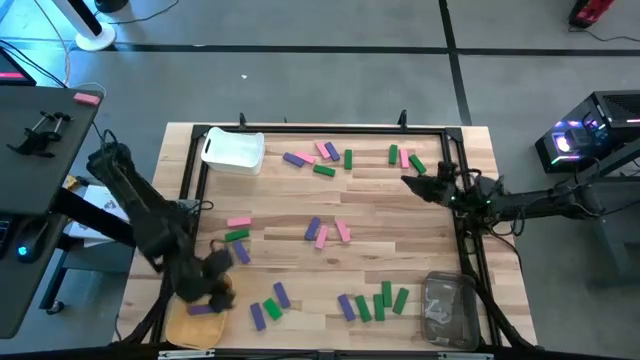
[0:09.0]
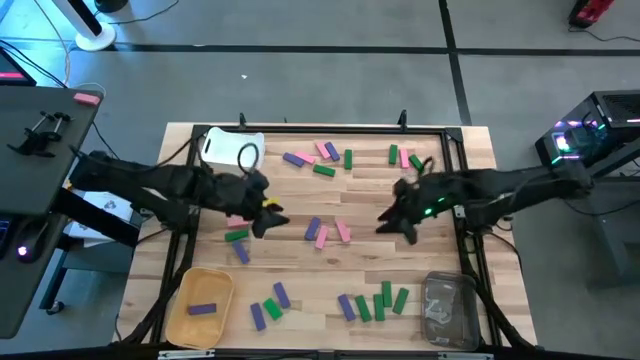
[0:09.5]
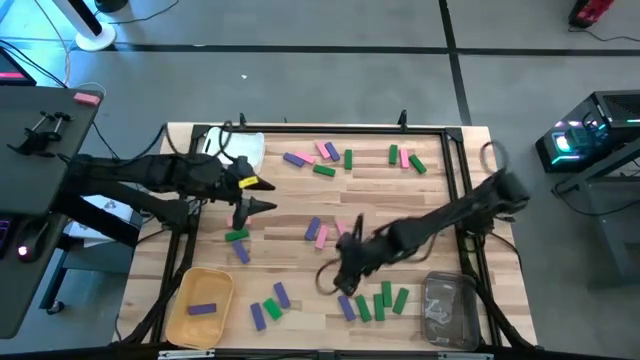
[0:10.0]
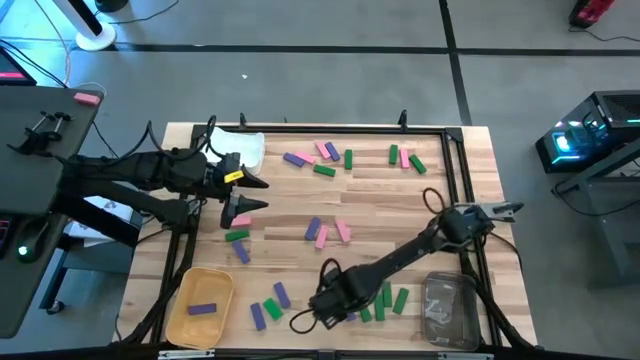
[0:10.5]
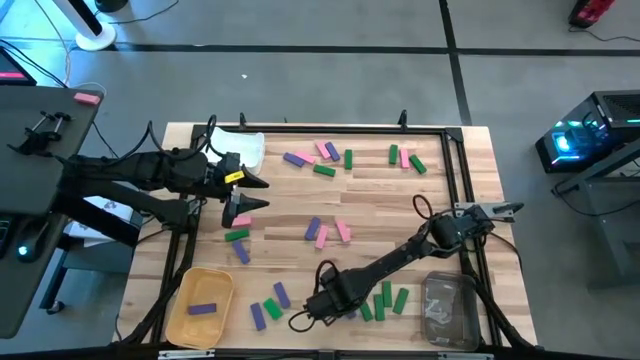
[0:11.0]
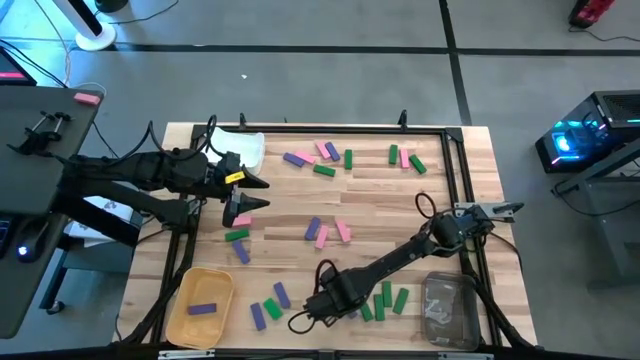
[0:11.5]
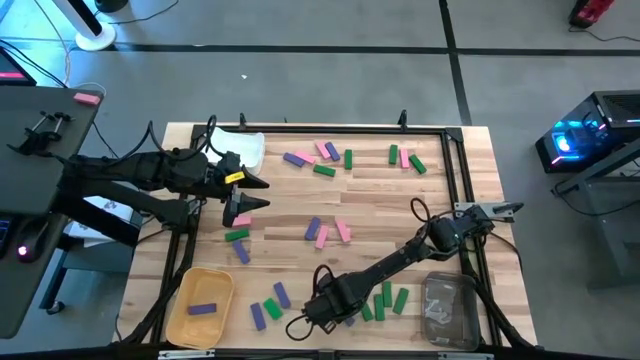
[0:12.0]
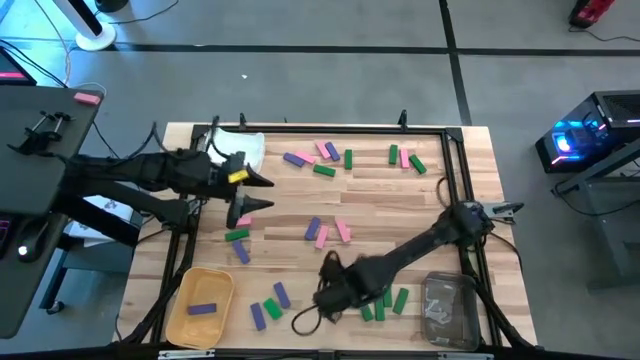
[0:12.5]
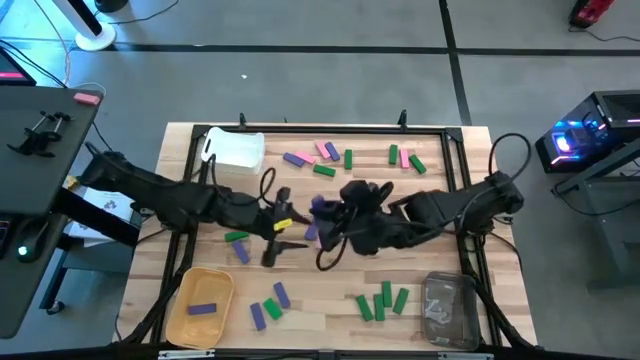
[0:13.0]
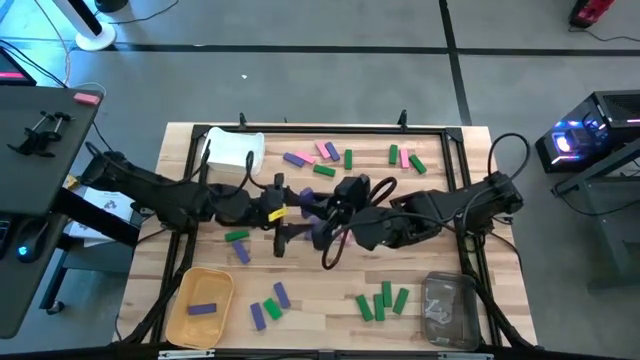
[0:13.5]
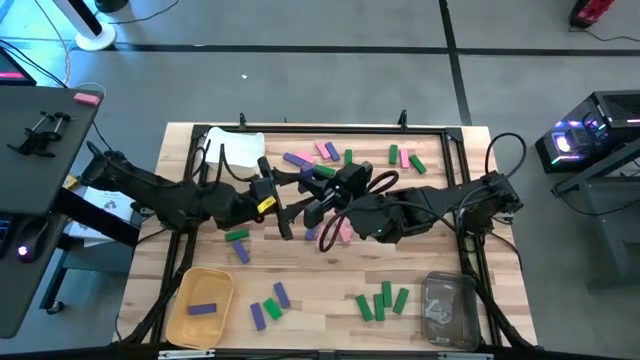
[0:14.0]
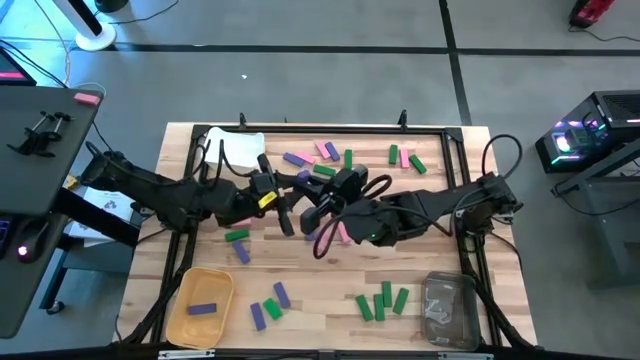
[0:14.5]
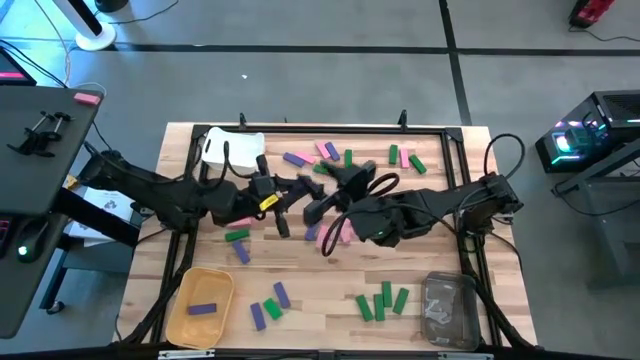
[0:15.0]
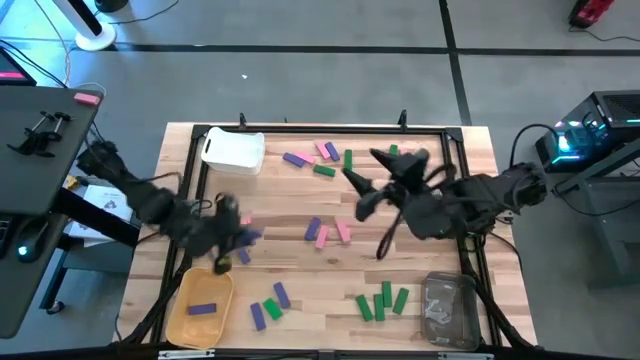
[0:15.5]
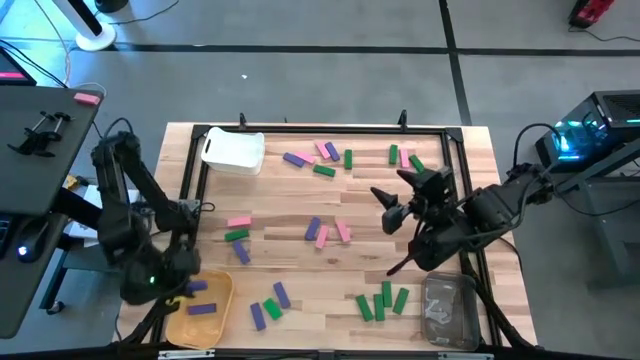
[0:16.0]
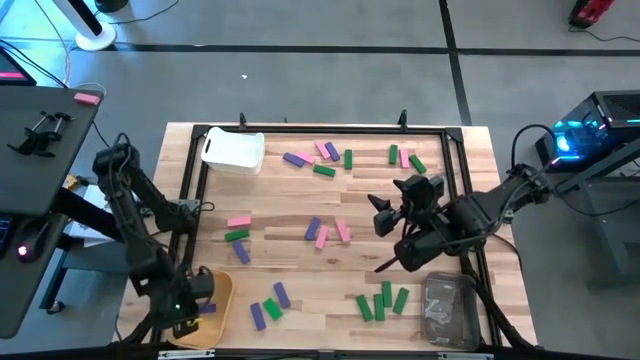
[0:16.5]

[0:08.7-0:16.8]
Task: Sort blocks
Put the violet block into the yellow bin

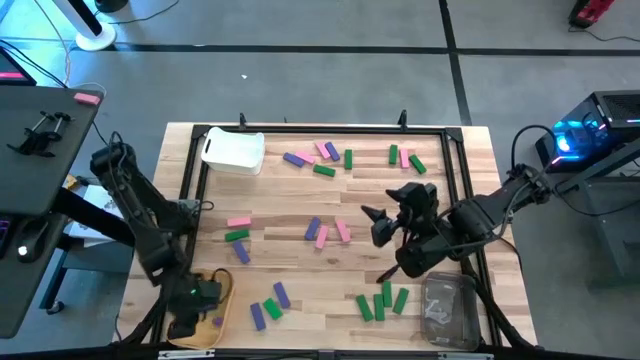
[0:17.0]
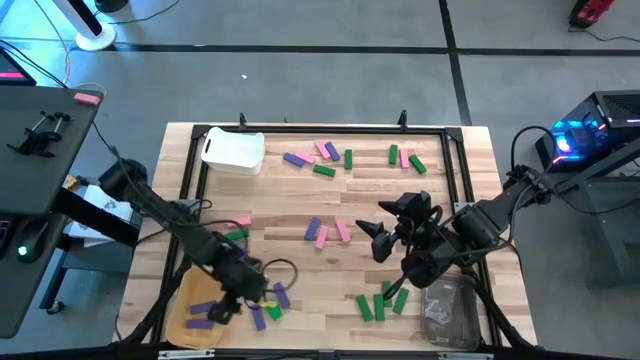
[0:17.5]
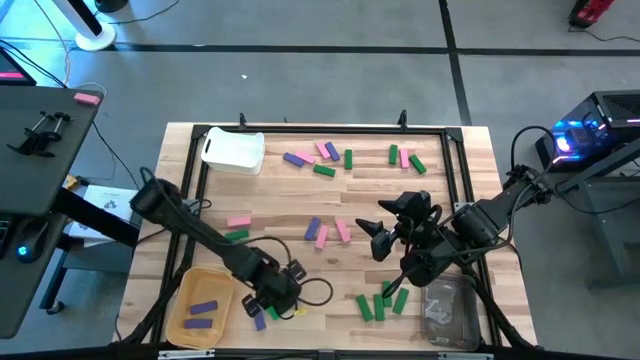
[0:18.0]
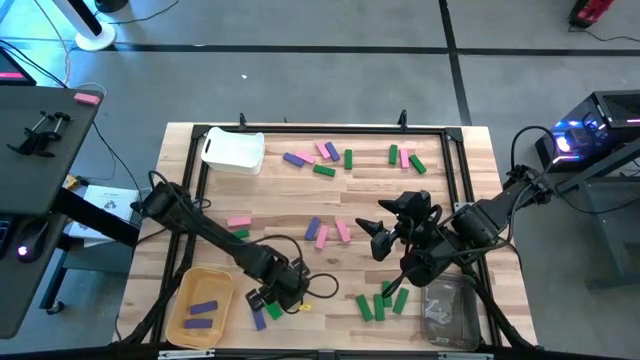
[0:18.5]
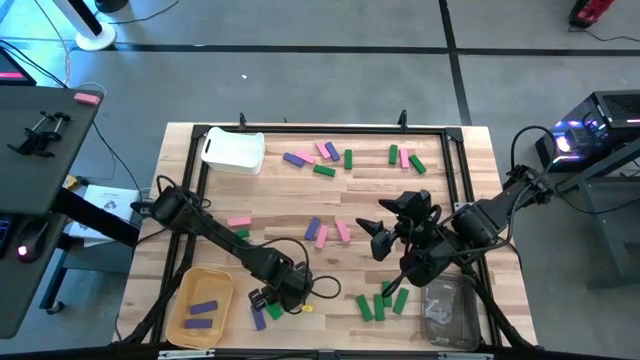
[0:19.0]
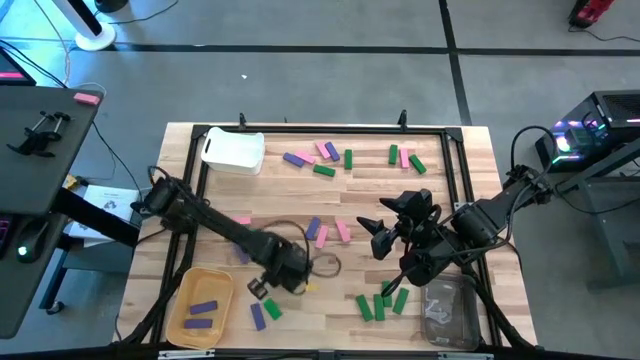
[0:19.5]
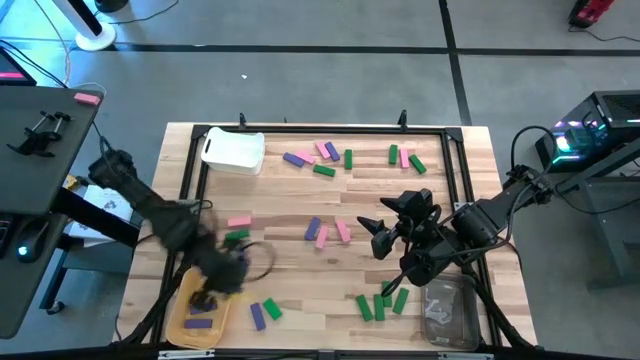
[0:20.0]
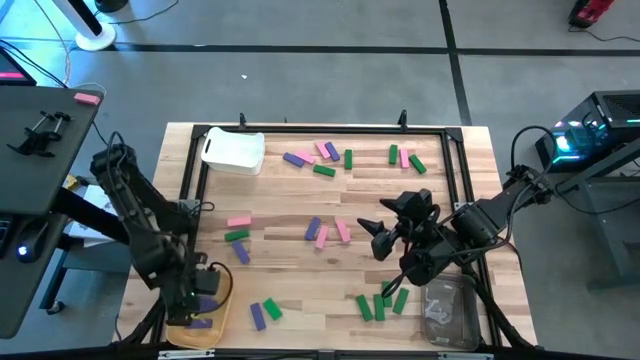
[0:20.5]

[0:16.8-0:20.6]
Put the violet block into the yellow bin

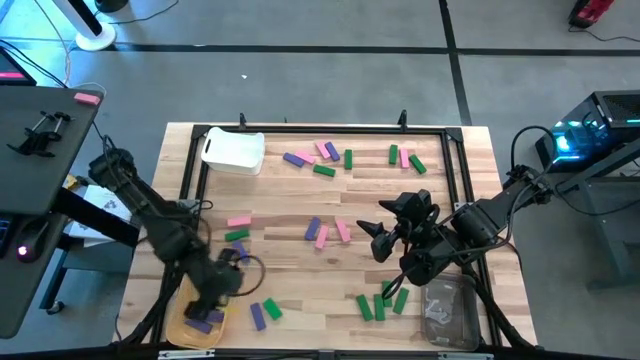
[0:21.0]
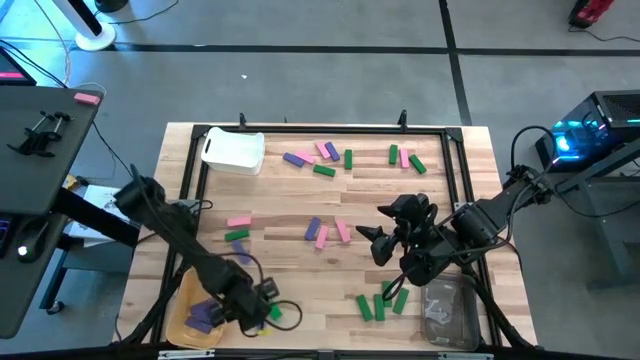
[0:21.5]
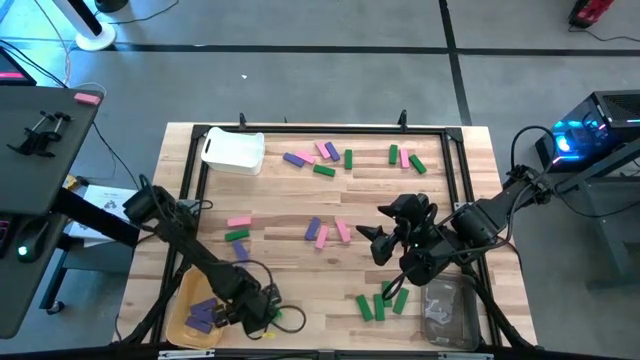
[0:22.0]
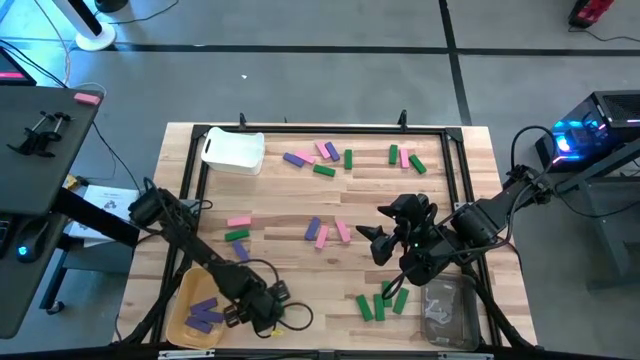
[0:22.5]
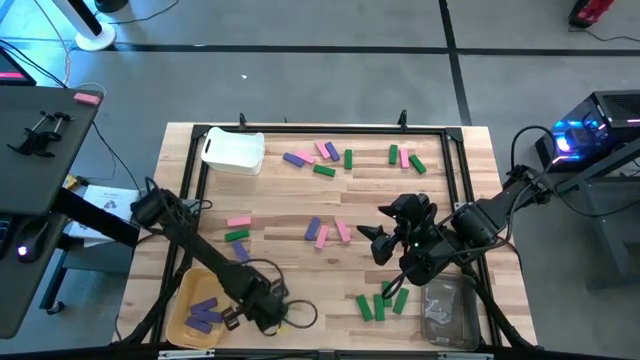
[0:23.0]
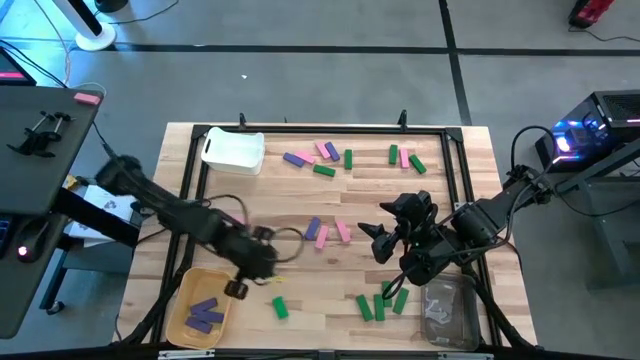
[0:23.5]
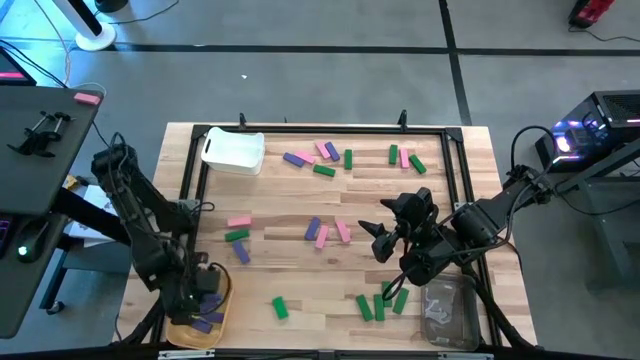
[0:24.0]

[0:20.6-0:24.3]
Put the violet block into the yellow bin

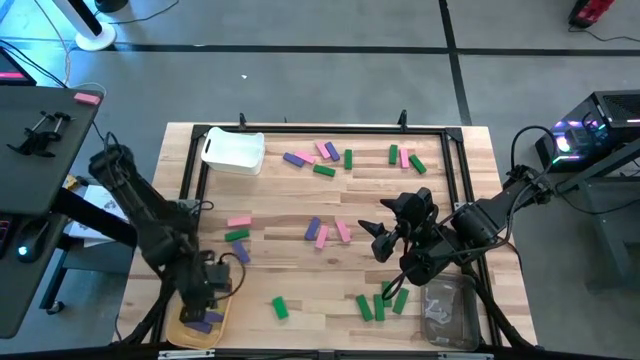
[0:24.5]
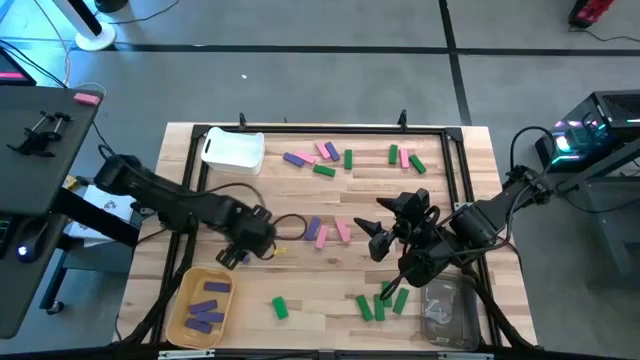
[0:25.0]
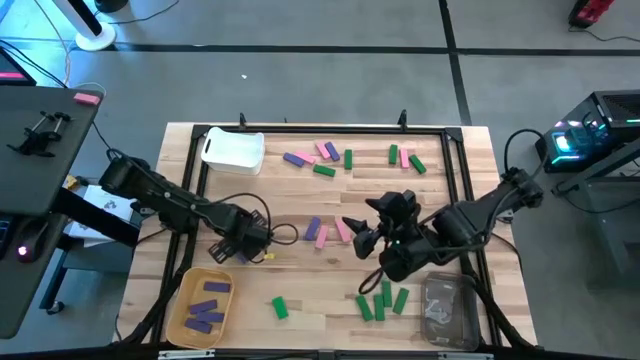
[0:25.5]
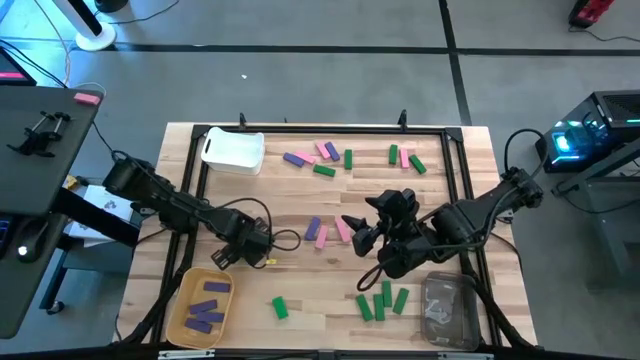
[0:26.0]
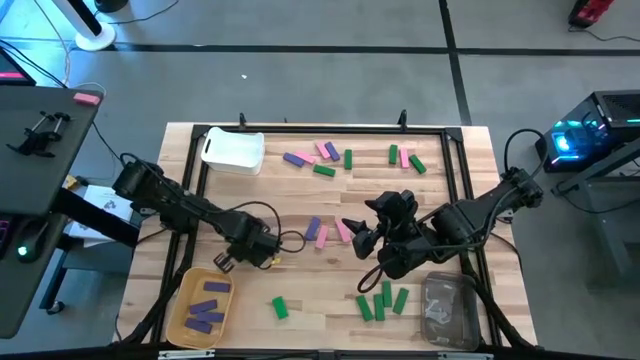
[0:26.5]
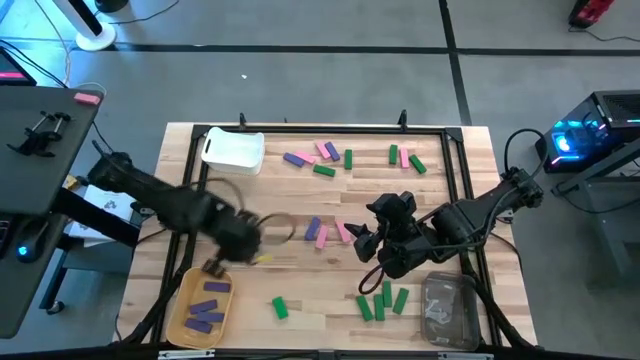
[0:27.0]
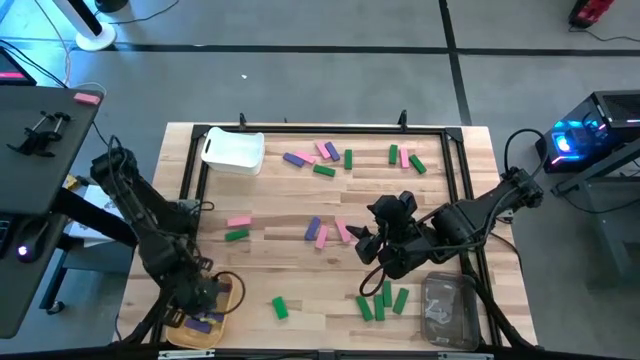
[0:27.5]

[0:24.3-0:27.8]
Put the violet block into the yellow bin

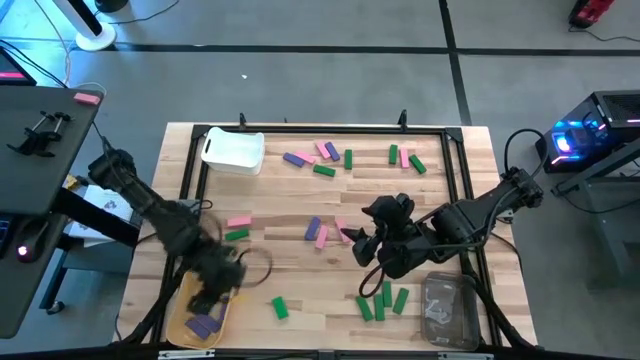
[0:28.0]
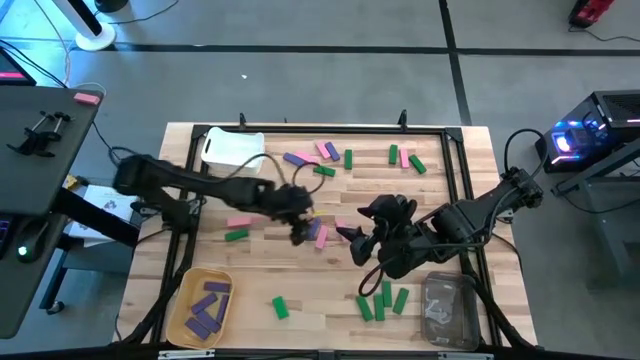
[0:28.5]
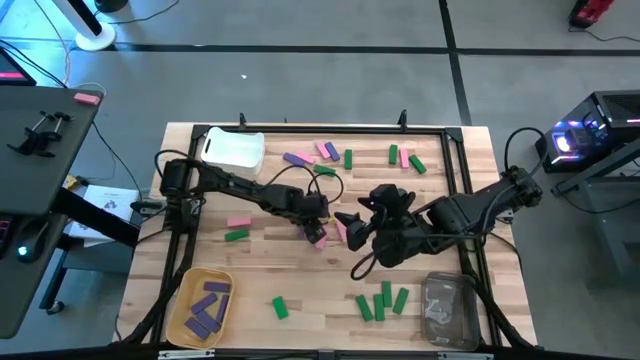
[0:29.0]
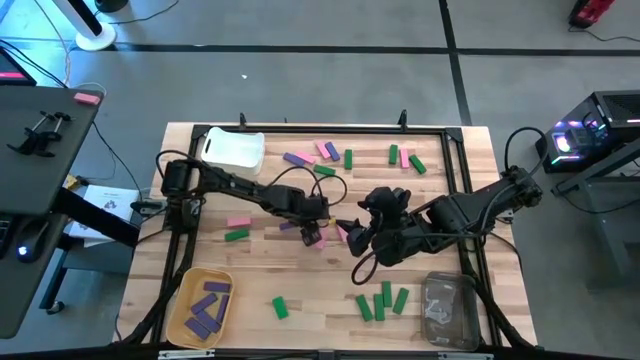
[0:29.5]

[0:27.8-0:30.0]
Put the violet block into the yellow bin

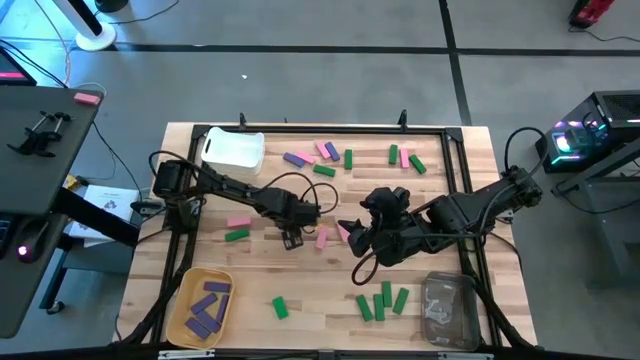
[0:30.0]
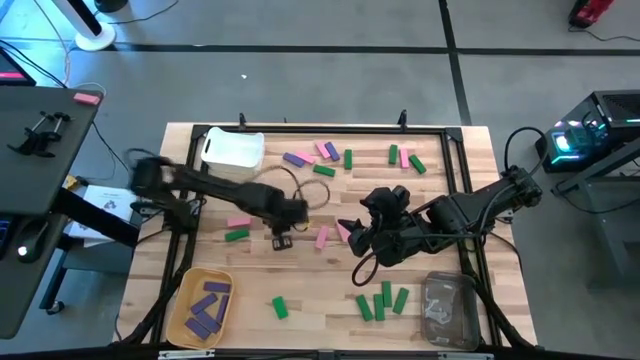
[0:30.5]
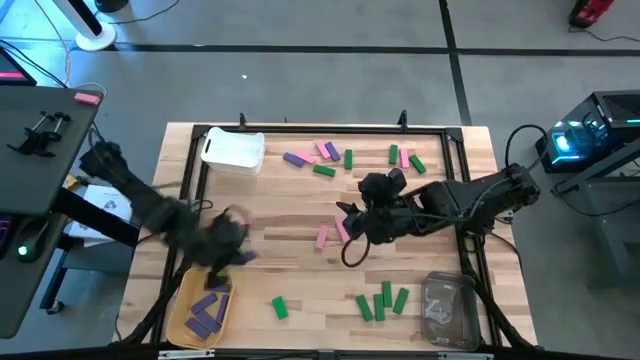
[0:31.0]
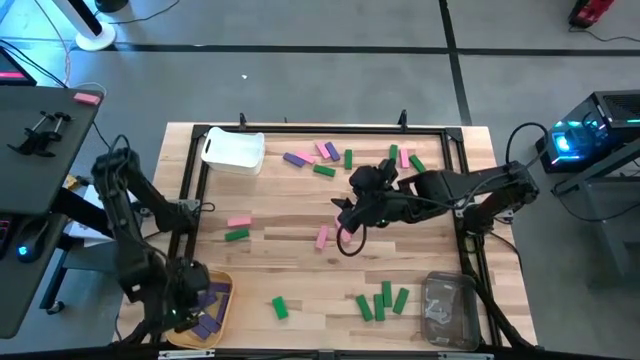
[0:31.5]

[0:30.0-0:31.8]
Put the violet block into the yellow bin
